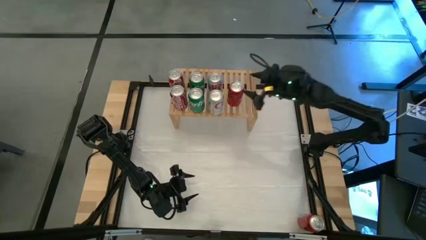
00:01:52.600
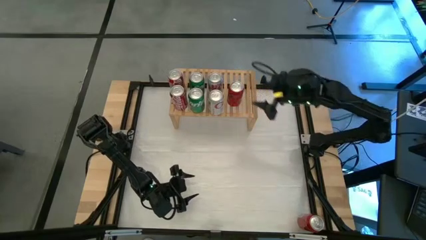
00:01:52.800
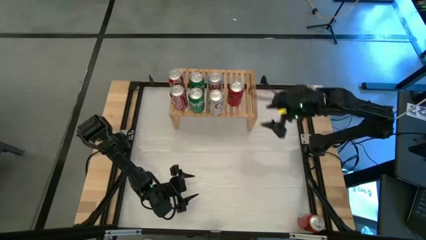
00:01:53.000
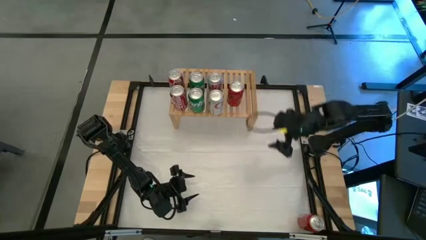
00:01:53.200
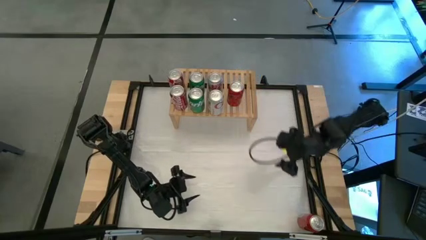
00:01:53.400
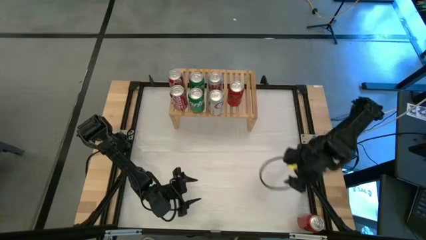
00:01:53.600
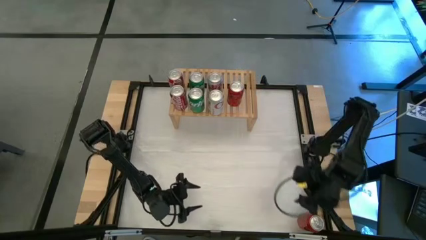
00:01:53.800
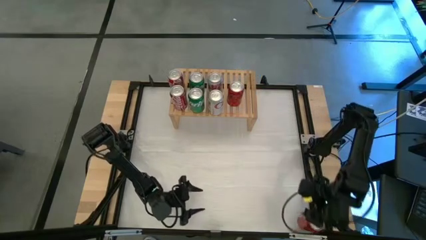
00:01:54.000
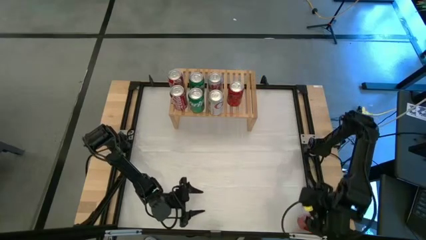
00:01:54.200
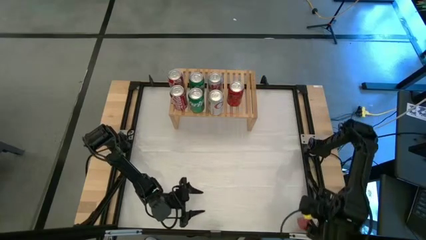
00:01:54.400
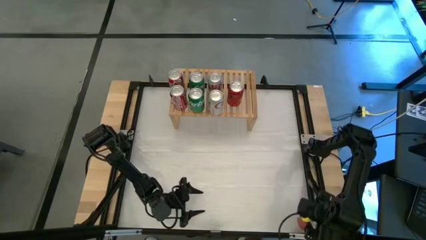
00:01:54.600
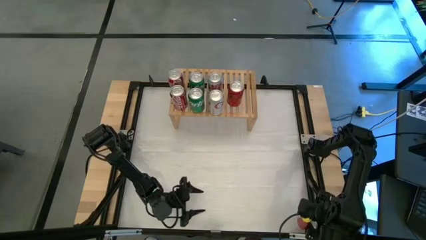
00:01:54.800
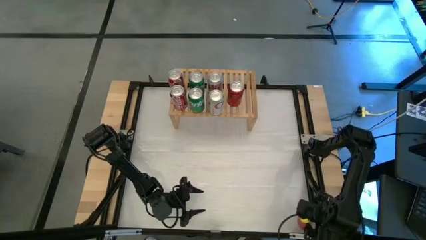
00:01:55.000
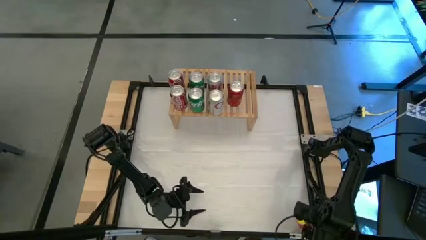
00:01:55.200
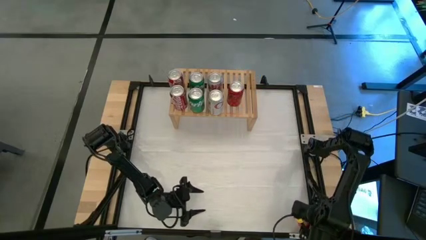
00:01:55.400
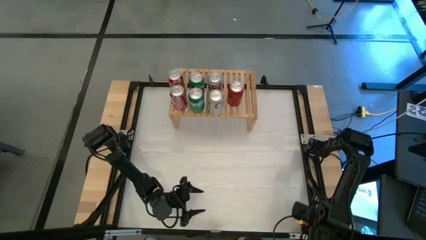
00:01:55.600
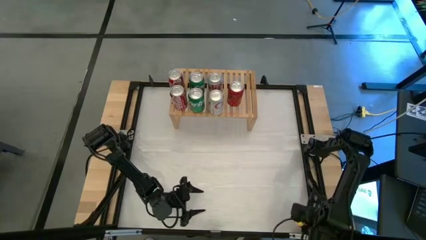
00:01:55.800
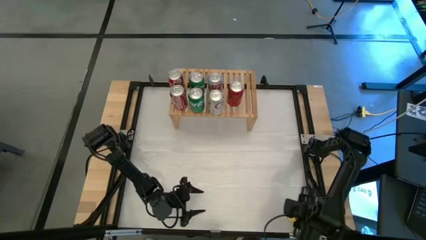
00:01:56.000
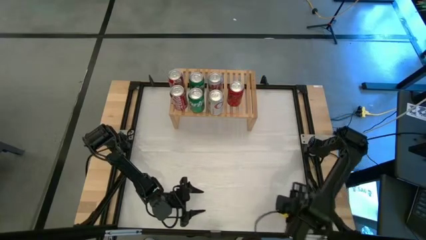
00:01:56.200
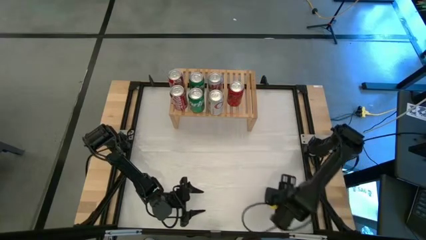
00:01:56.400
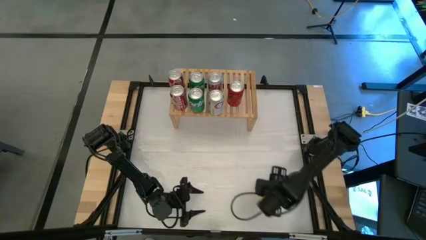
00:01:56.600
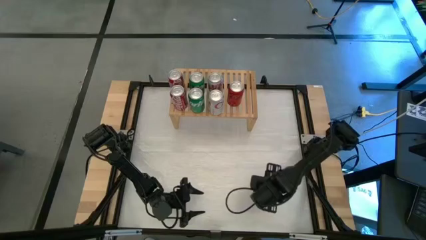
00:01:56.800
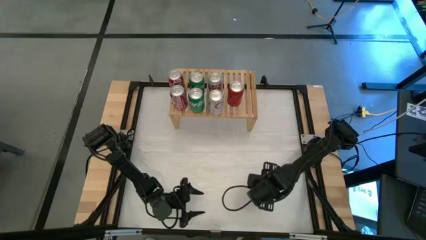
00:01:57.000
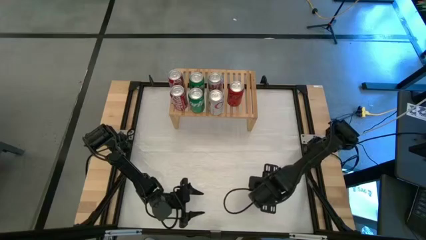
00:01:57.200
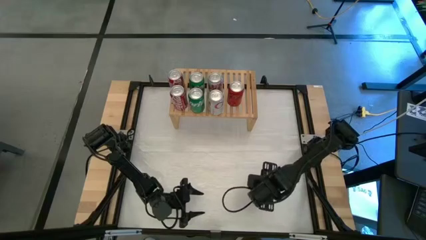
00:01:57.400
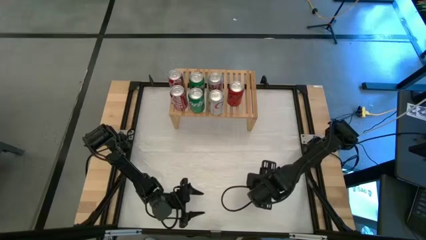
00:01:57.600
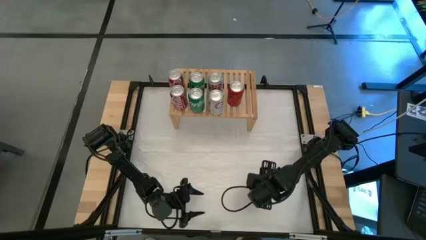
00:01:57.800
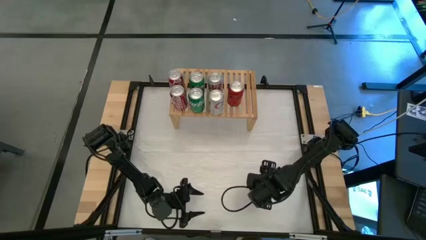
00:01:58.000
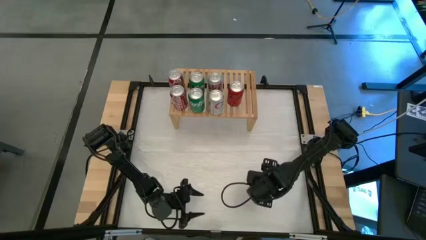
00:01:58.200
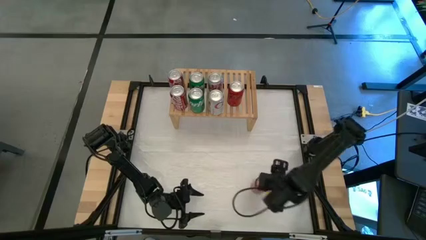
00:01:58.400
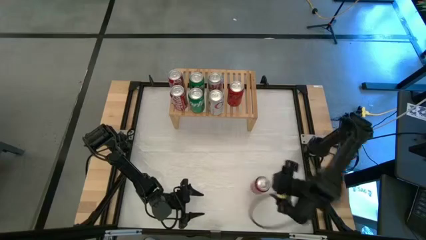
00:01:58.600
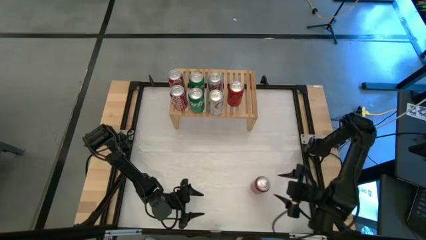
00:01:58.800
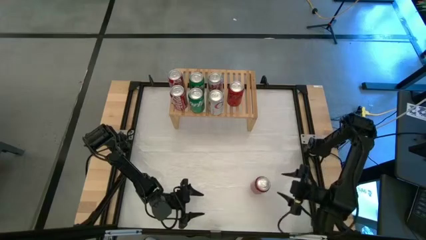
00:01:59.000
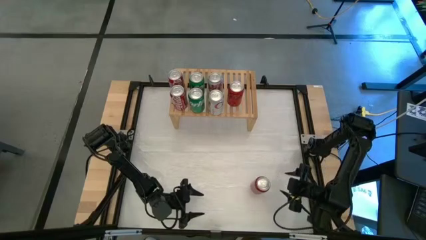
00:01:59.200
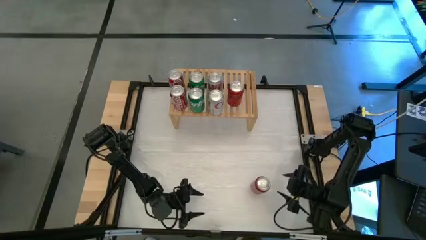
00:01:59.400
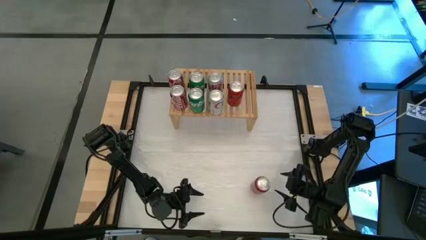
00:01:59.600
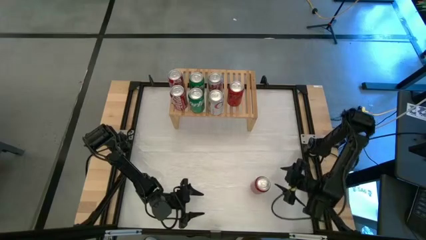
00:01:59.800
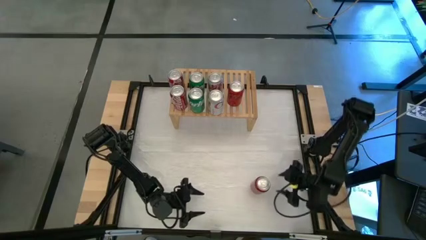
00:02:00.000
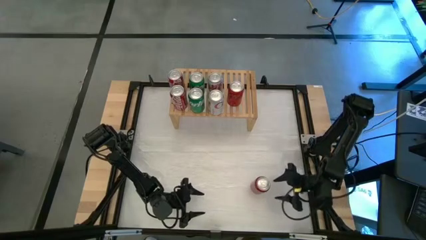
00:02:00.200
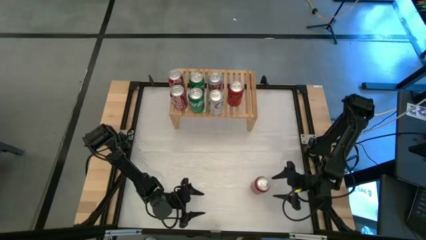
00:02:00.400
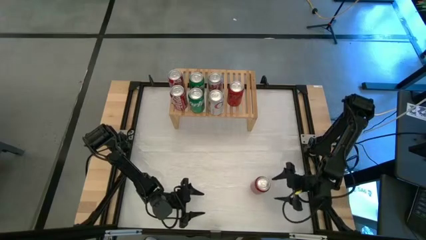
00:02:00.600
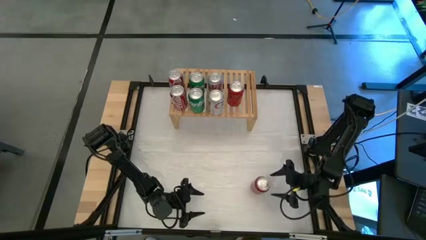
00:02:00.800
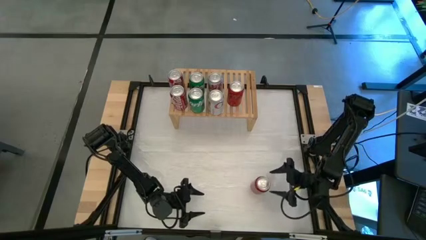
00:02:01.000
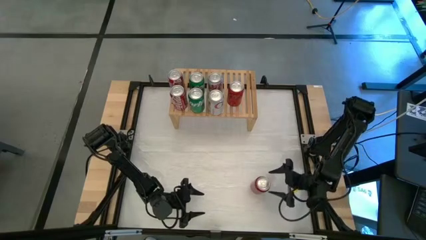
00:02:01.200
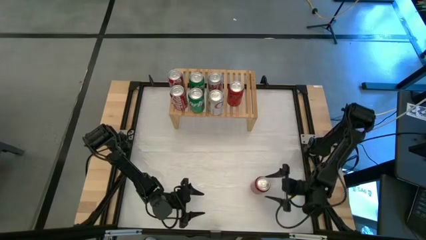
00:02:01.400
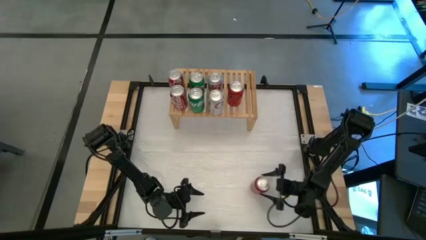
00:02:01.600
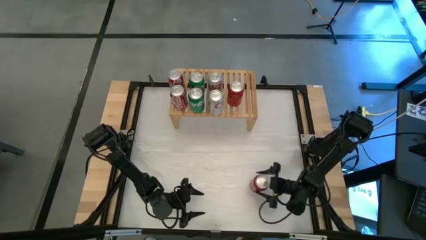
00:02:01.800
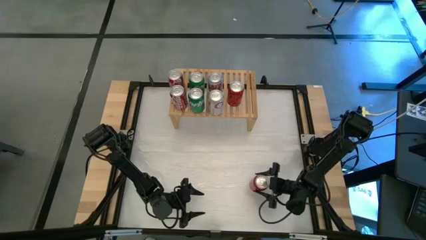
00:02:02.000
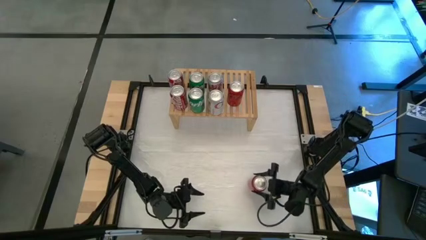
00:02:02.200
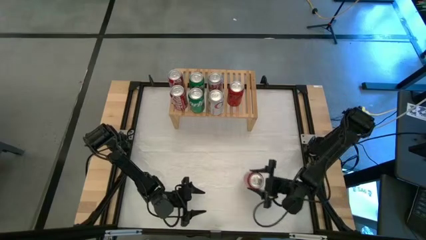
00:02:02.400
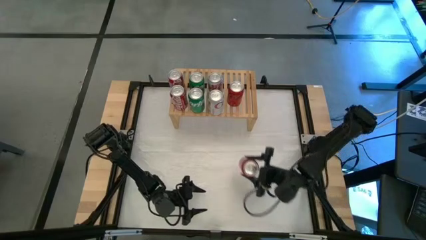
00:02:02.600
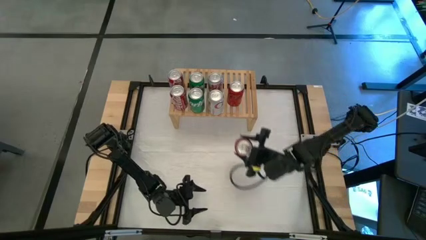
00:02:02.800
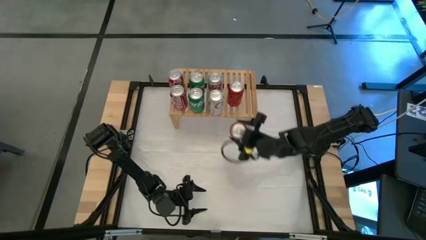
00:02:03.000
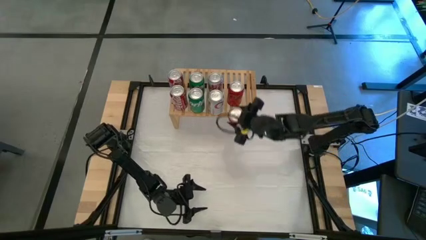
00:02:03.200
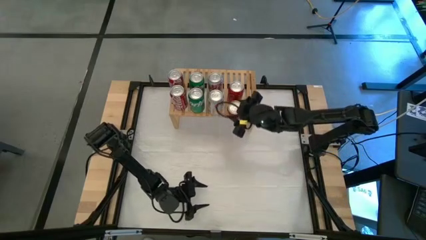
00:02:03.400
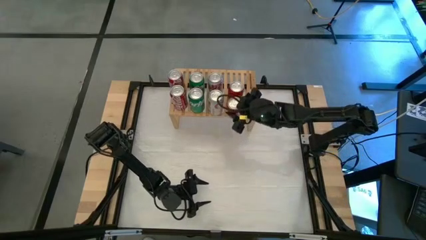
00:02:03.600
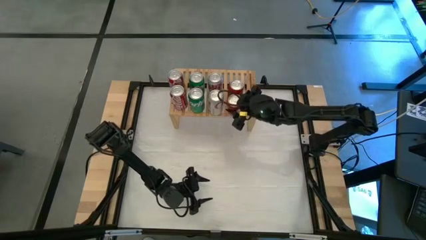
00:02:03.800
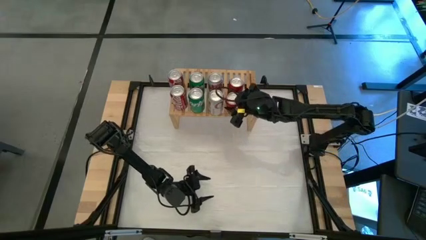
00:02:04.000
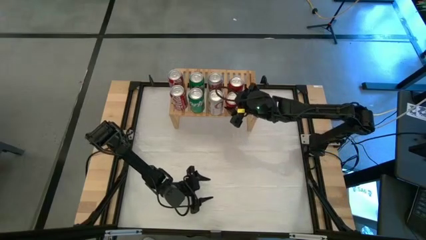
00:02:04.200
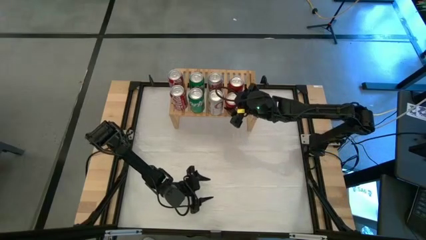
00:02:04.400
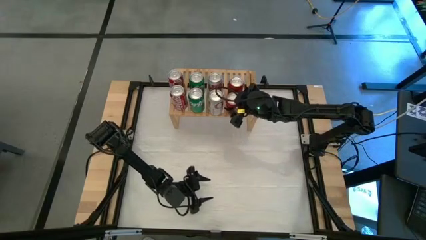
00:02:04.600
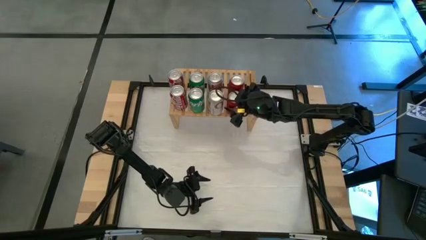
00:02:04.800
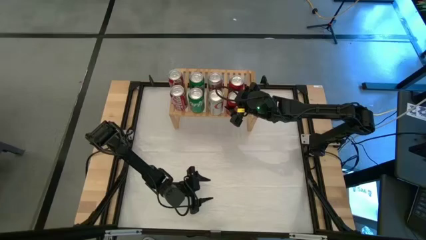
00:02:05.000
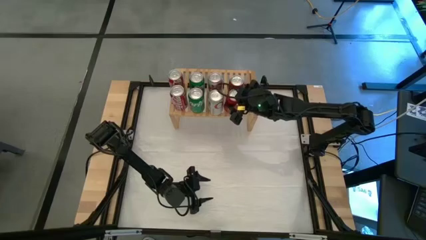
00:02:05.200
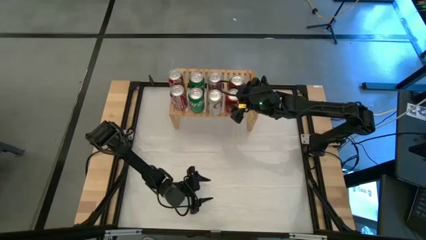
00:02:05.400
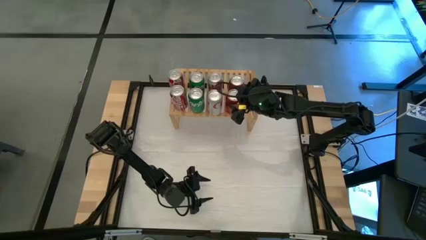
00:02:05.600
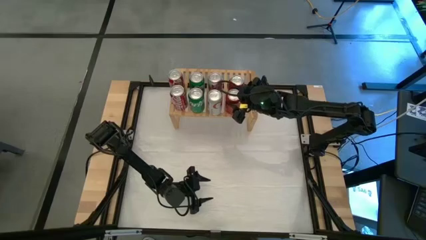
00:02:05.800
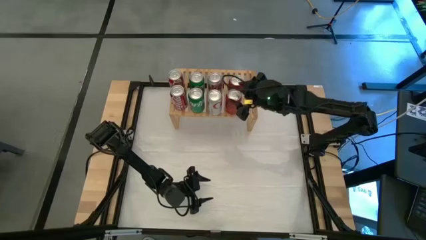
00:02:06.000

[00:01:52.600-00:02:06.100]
Task: Place canned beverage on shelf
Put the red soda can on the shelf aligned with the other red soda can
